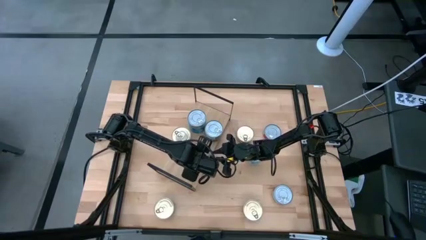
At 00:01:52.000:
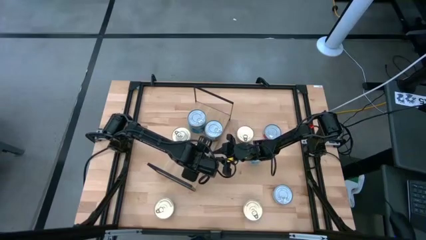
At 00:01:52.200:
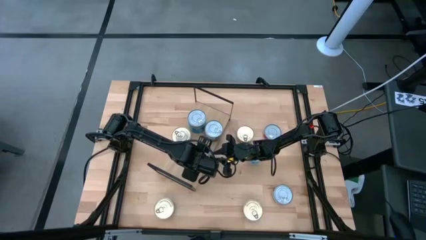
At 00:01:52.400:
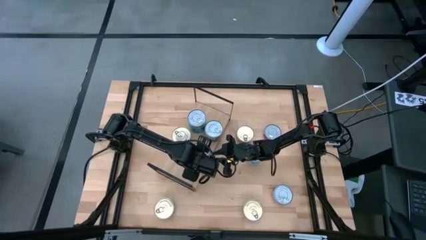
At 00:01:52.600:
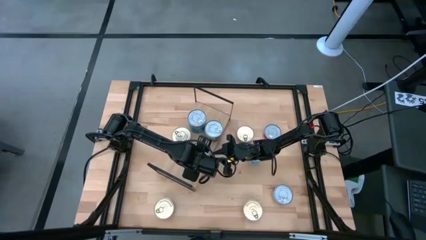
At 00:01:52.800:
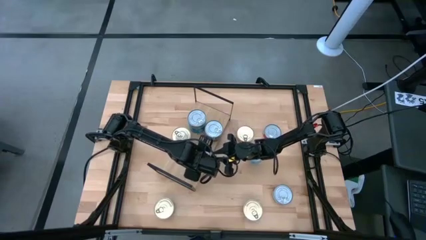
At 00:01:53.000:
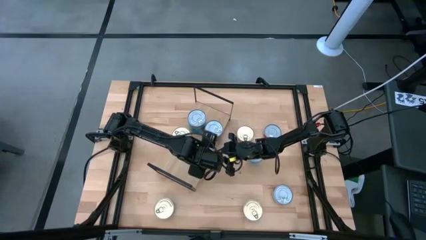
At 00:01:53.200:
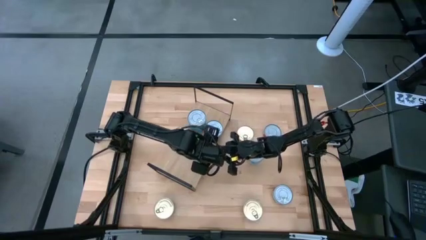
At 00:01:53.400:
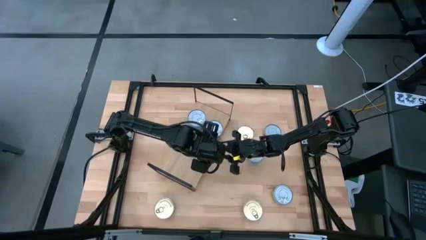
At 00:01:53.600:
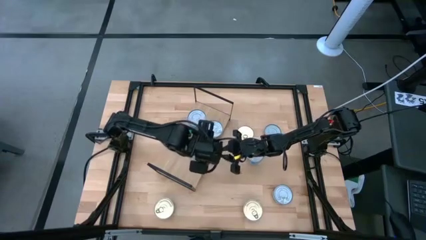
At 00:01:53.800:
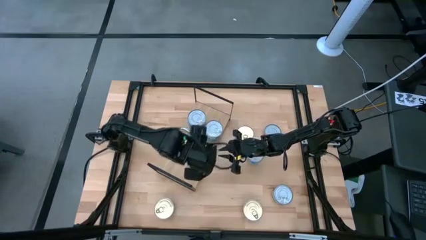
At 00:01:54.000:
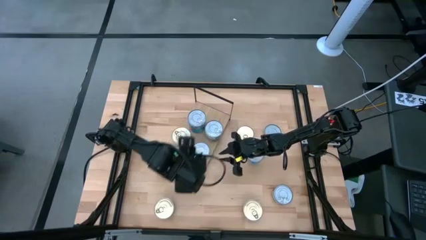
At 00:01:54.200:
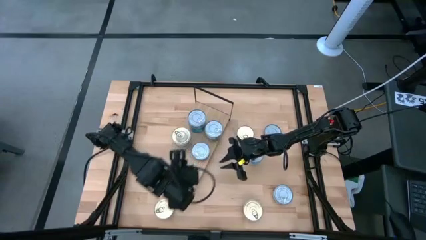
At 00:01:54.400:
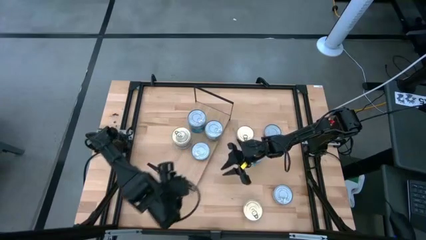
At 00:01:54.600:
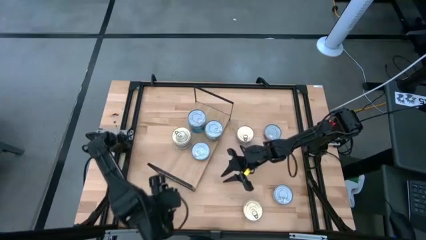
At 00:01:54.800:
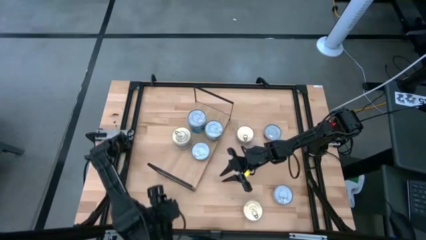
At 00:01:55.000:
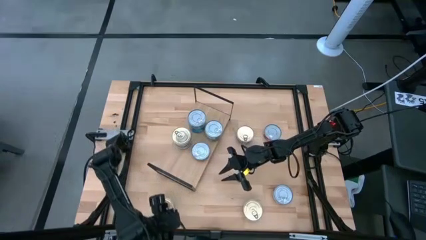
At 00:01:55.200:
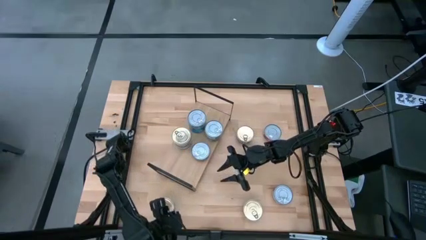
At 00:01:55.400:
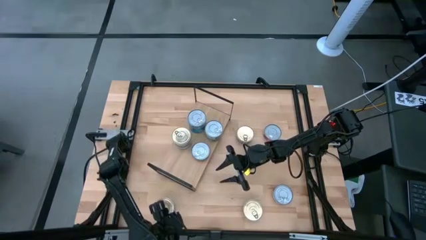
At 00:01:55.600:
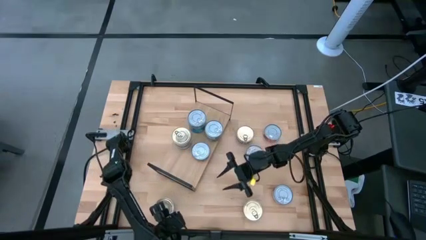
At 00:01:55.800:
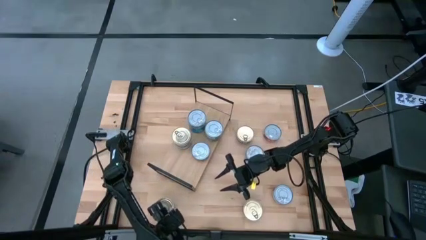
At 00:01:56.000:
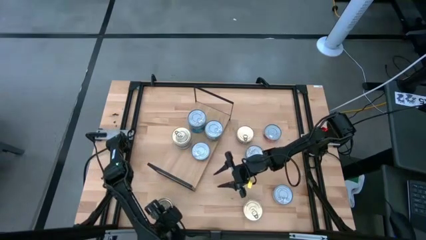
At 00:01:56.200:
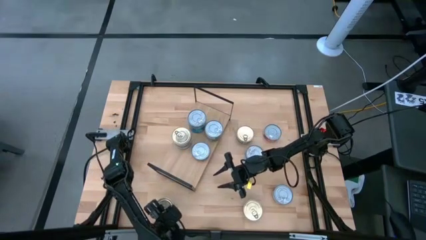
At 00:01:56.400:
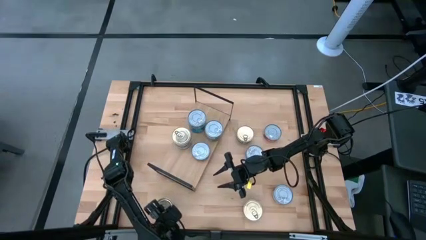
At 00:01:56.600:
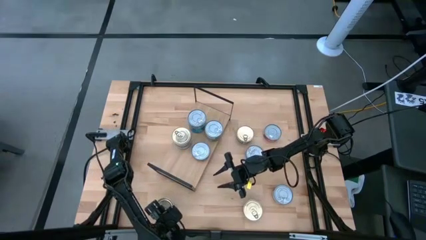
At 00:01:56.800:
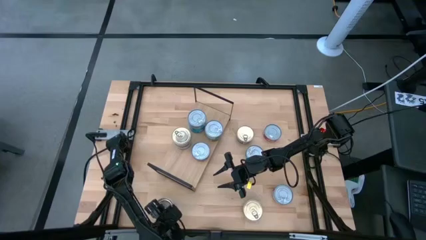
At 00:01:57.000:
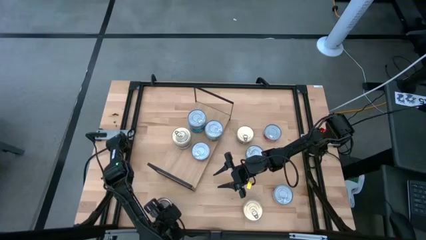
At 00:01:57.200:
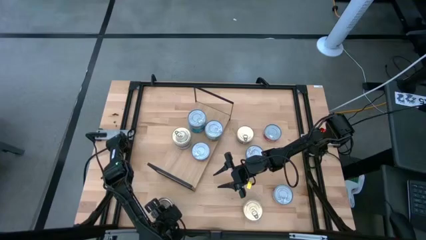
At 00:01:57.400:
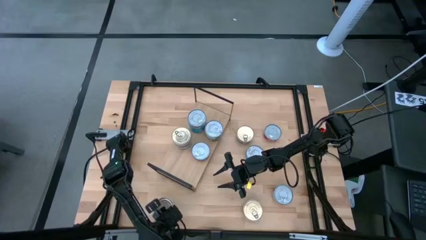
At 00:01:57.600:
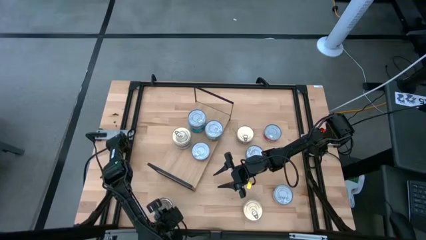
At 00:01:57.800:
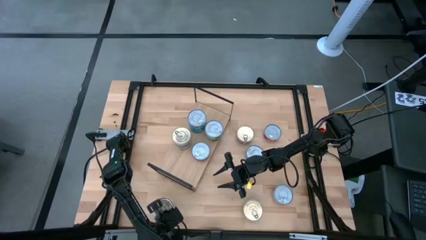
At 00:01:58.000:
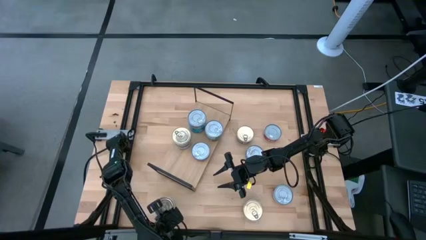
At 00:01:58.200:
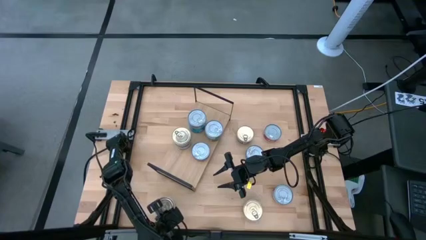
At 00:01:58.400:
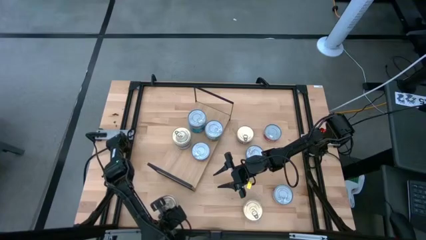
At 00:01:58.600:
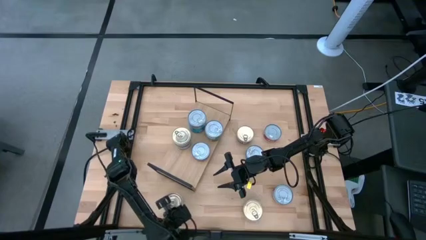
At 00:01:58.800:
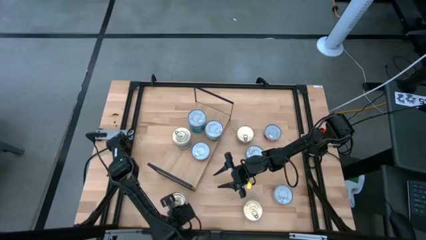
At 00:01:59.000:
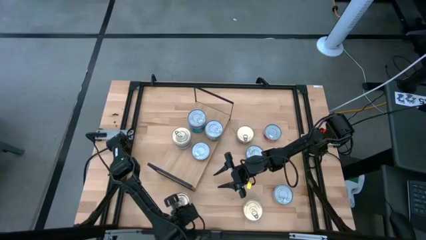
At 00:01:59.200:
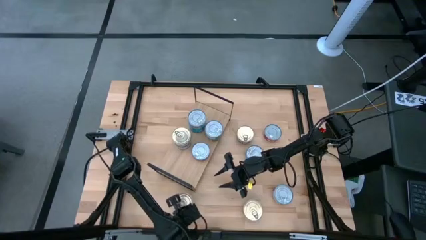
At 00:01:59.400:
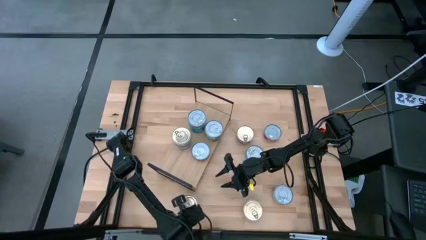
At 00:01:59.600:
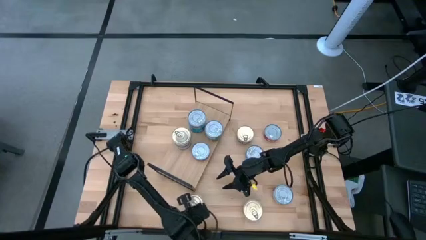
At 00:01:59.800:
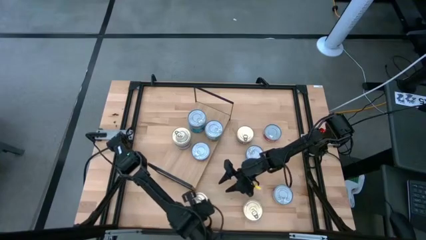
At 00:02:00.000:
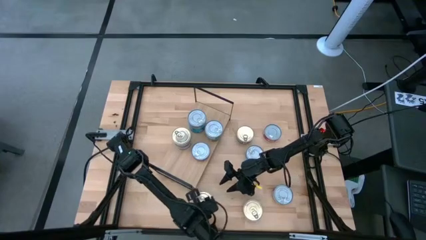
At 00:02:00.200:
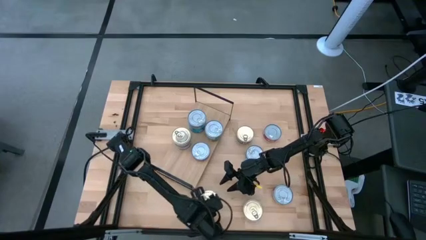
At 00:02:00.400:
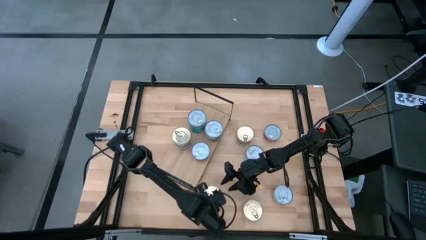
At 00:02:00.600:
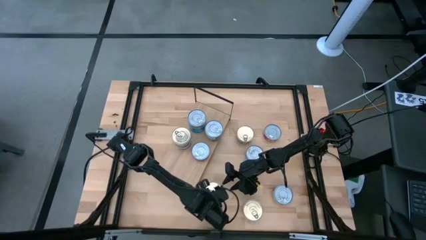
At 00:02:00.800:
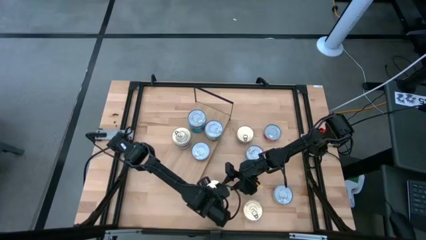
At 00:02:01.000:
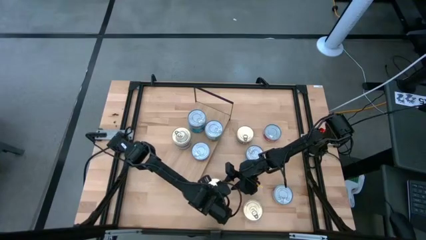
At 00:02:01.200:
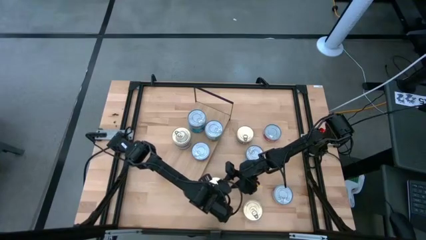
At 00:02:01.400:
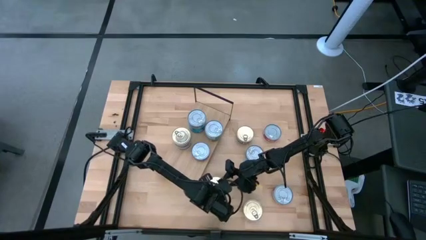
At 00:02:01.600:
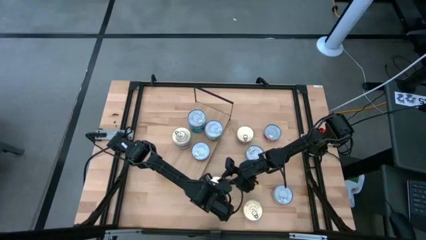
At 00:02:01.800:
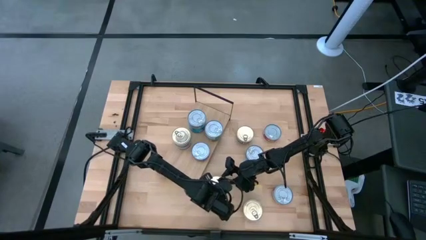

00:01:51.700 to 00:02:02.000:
Task: Stack canned seafood by type on shelf
Stack the blue tuna can on top of the blue tuna can on the shelf

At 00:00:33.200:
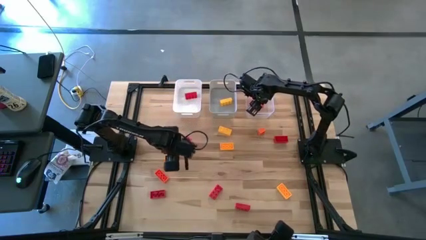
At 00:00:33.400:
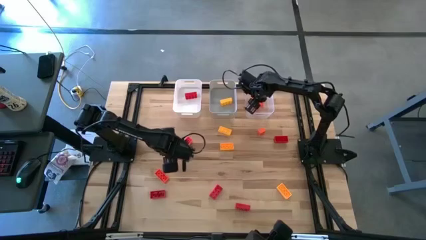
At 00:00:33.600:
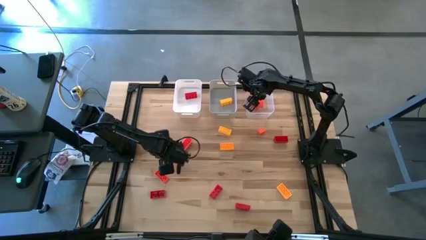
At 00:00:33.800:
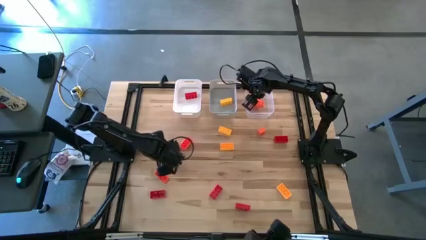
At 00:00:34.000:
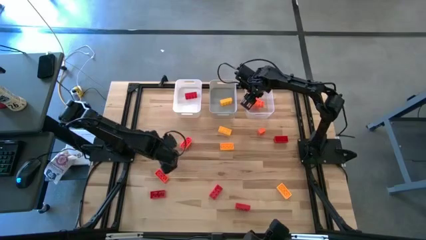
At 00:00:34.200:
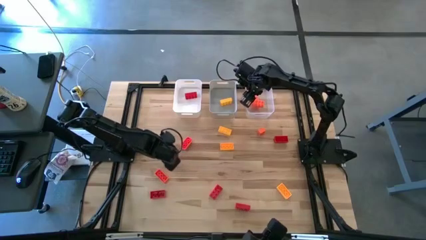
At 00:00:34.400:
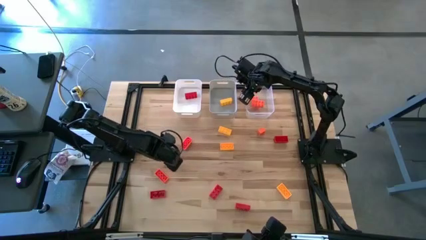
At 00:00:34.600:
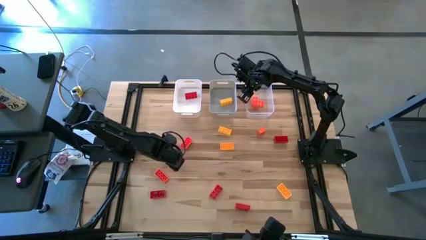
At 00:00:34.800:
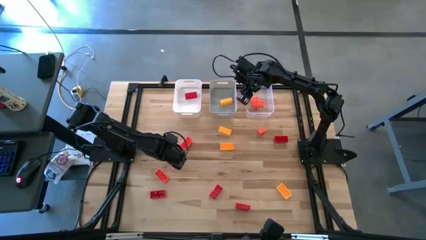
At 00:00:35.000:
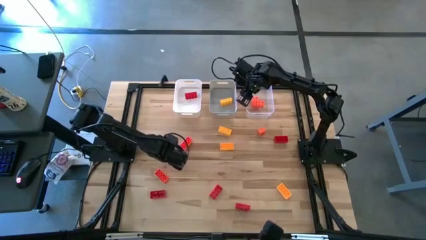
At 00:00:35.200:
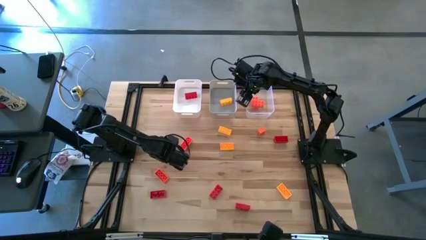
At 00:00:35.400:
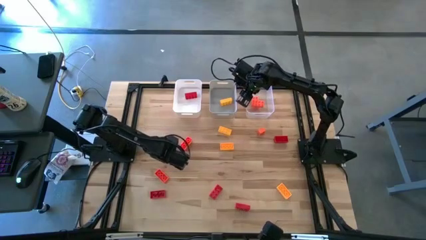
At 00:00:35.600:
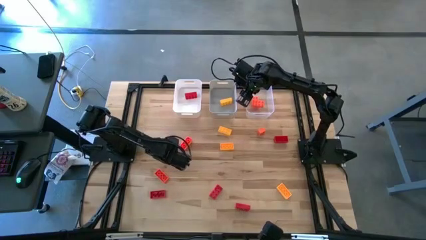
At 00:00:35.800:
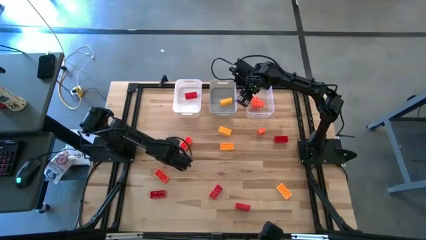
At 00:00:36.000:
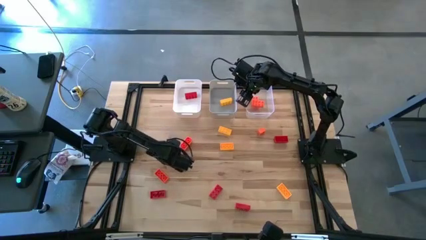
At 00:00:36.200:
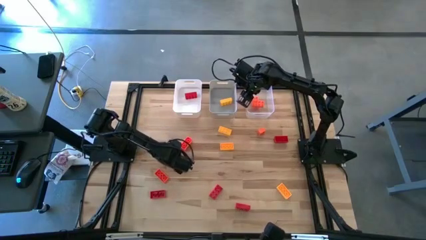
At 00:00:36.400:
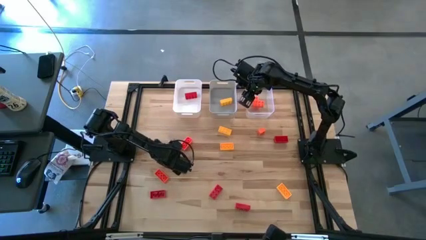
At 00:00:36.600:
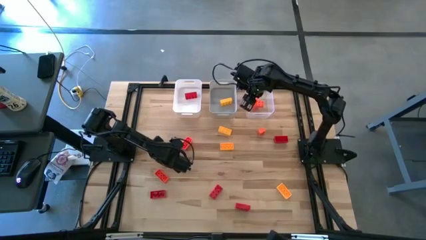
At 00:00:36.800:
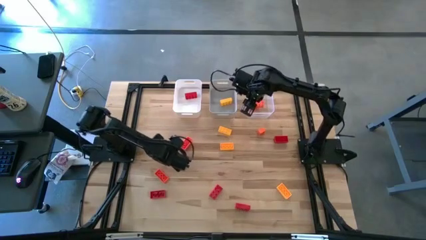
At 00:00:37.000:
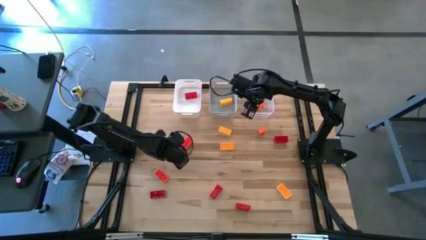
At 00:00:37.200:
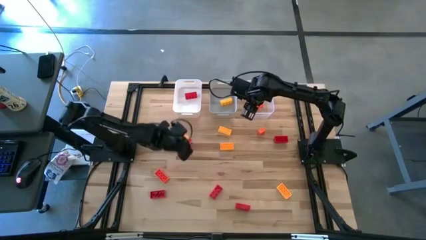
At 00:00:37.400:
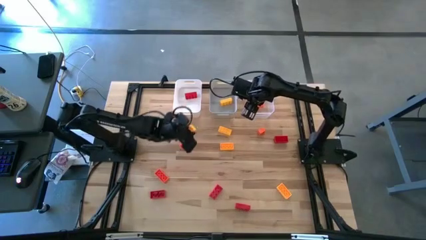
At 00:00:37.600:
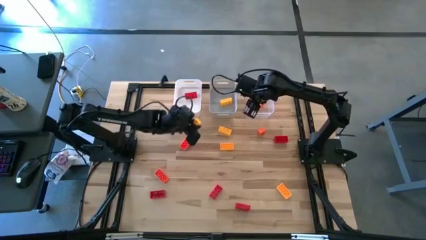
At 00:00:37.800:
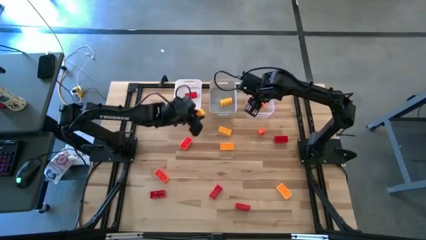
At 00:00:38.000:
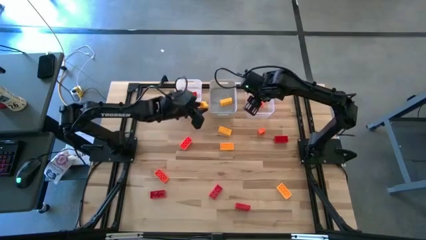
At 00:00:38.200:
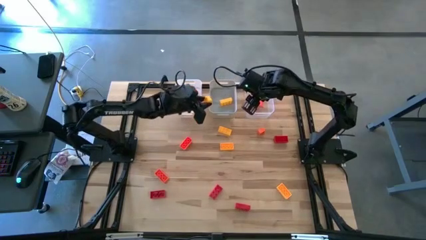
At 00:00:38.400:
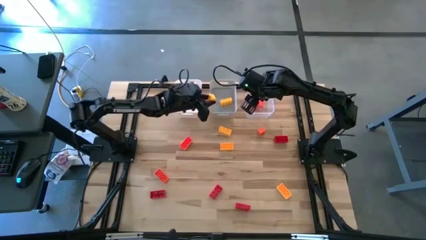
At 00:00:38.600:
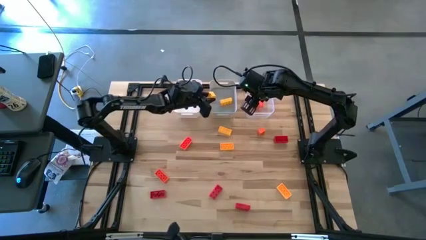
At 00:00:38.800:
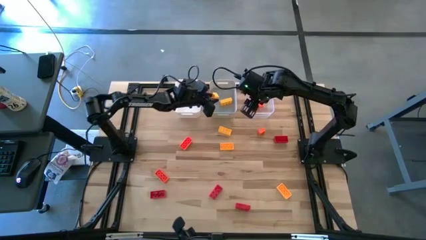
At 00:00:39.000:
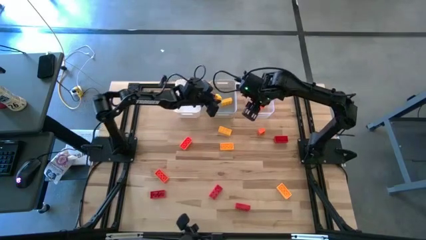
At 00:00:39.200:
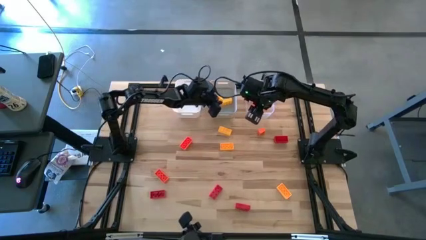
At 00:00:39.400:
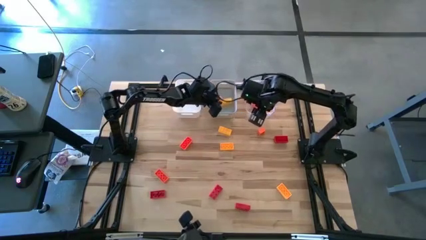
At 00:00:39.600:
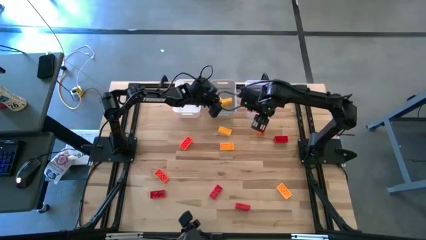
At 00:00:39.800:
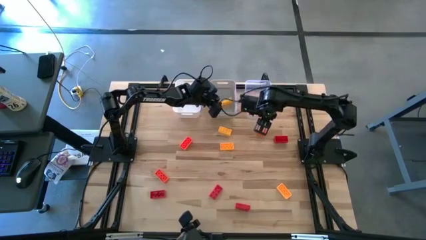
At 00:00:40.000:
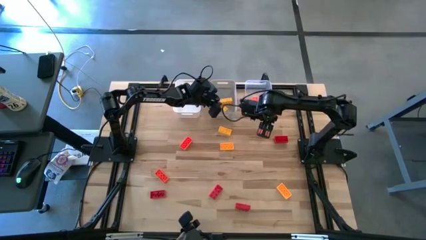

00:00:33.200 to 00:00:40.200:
Task: Sort & place blocks by color
Put the yellow game piece into the gray bin
